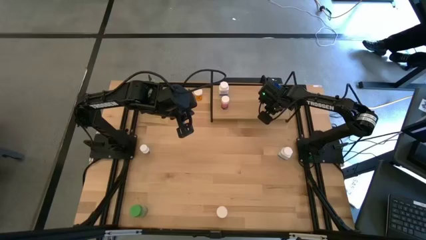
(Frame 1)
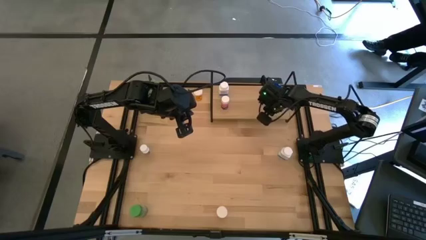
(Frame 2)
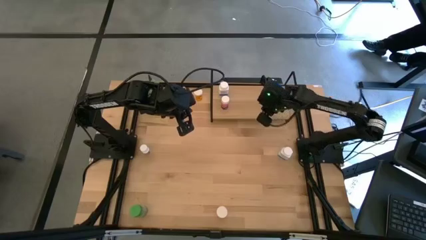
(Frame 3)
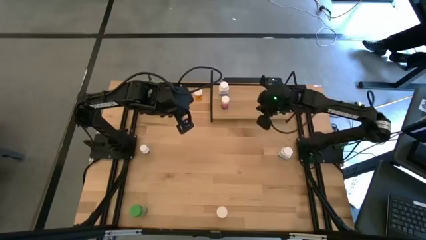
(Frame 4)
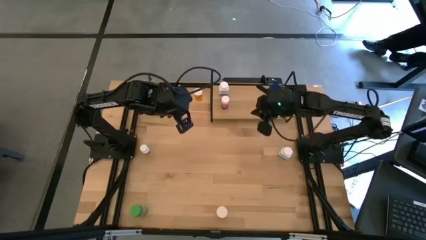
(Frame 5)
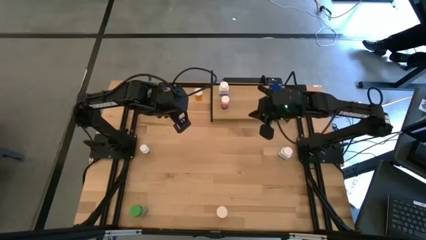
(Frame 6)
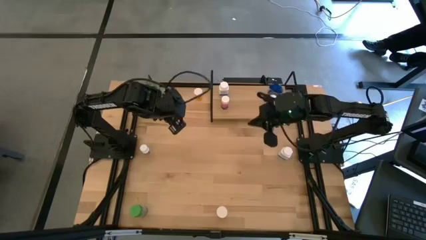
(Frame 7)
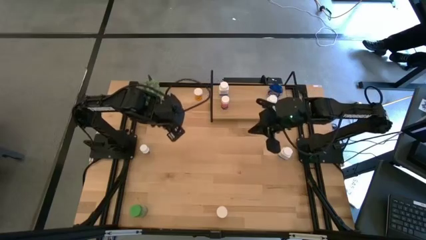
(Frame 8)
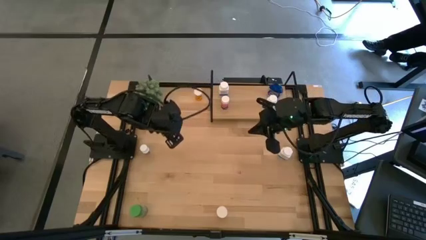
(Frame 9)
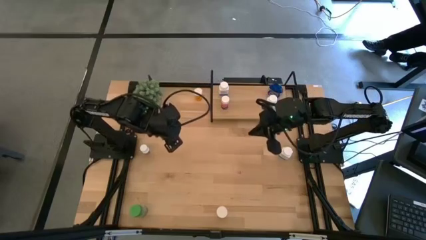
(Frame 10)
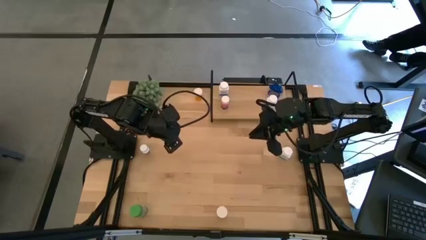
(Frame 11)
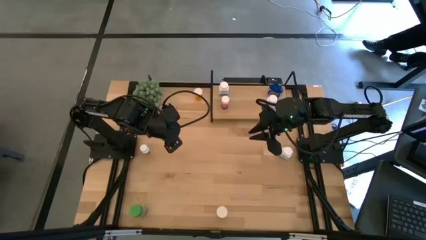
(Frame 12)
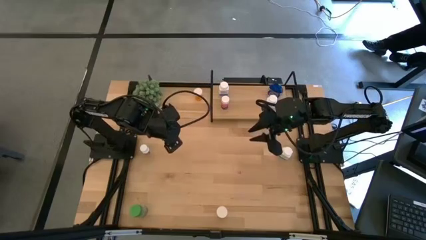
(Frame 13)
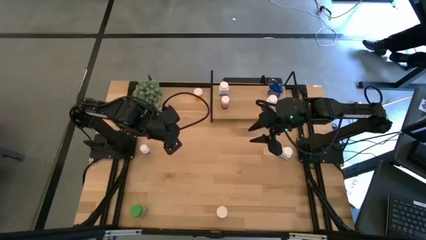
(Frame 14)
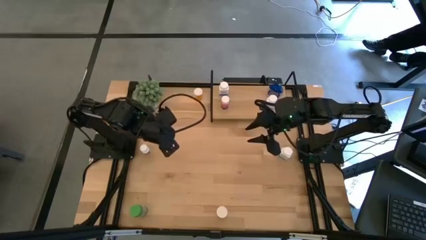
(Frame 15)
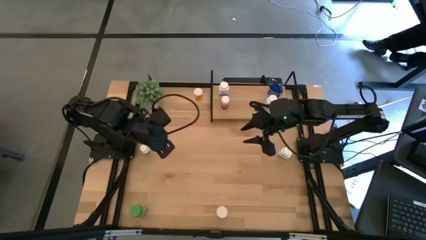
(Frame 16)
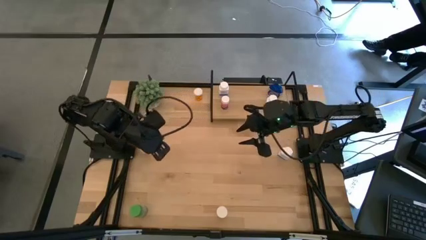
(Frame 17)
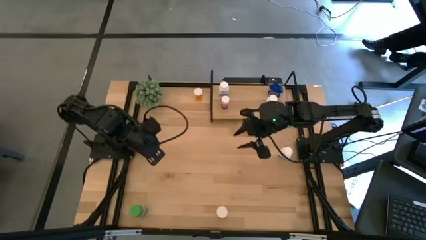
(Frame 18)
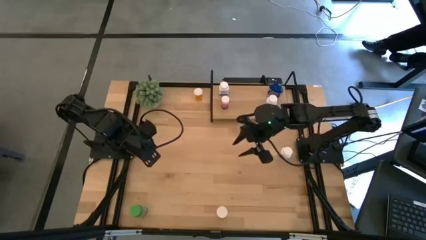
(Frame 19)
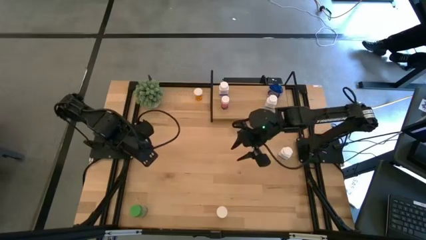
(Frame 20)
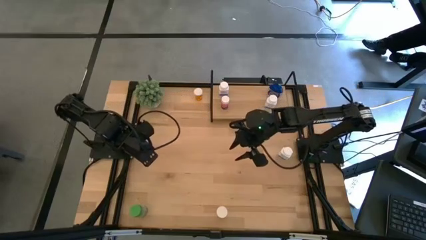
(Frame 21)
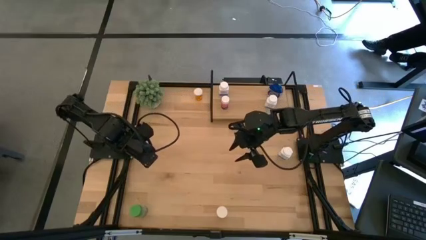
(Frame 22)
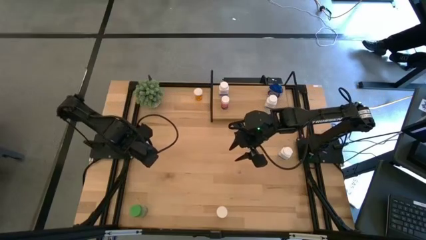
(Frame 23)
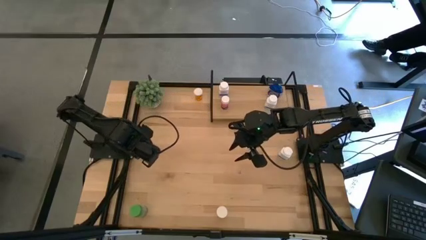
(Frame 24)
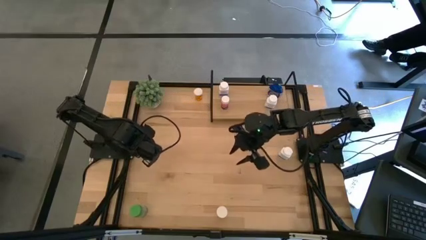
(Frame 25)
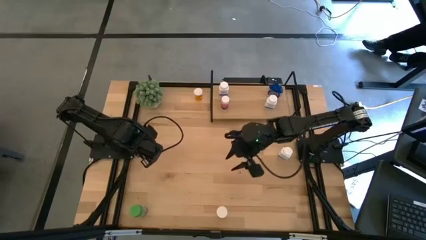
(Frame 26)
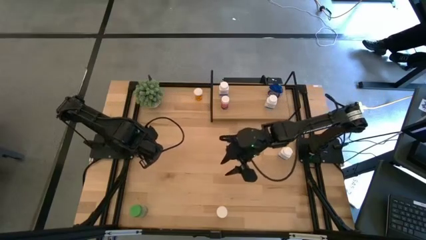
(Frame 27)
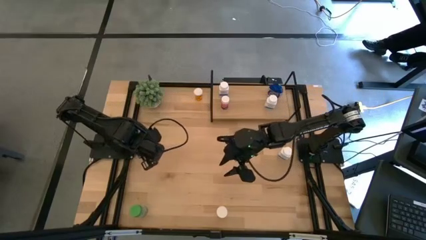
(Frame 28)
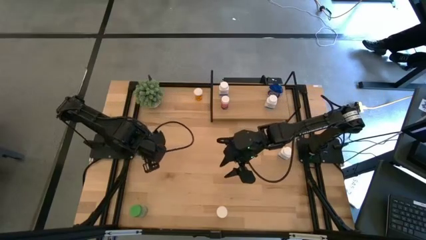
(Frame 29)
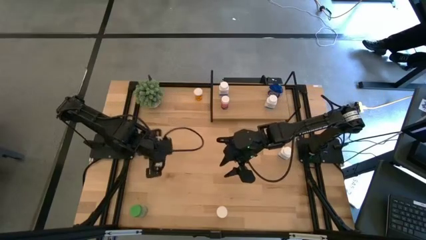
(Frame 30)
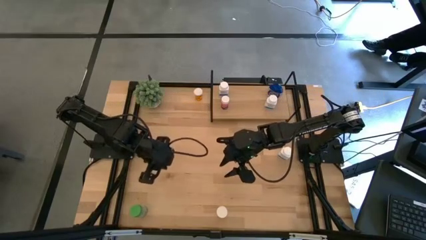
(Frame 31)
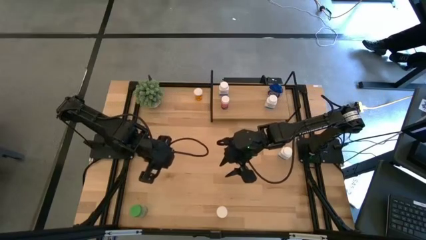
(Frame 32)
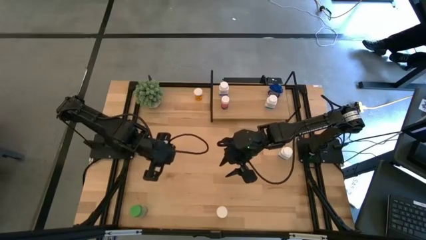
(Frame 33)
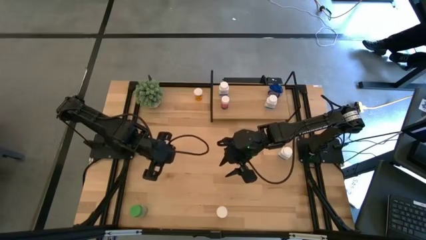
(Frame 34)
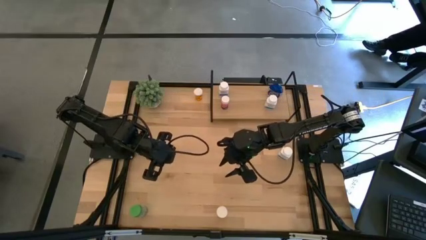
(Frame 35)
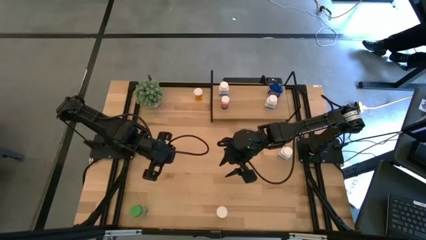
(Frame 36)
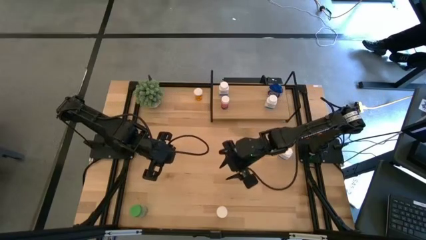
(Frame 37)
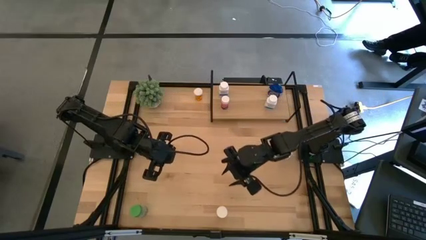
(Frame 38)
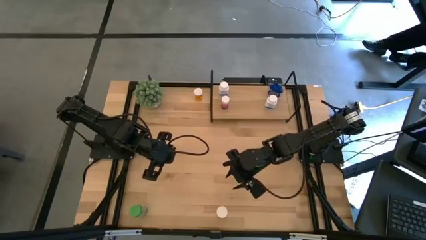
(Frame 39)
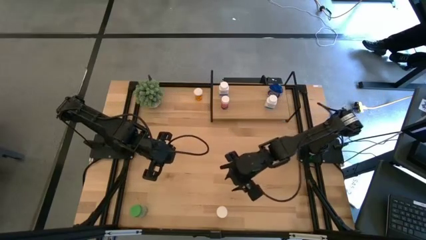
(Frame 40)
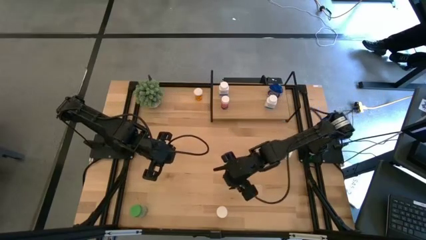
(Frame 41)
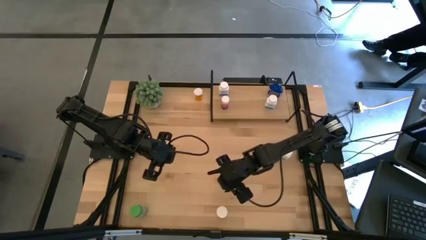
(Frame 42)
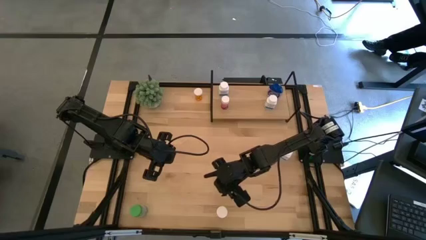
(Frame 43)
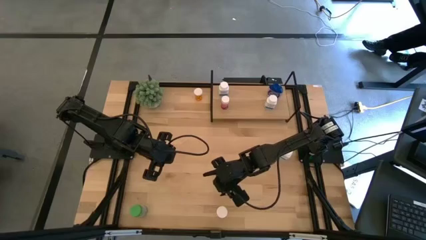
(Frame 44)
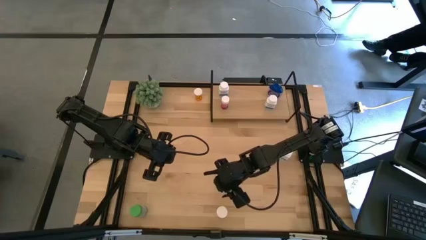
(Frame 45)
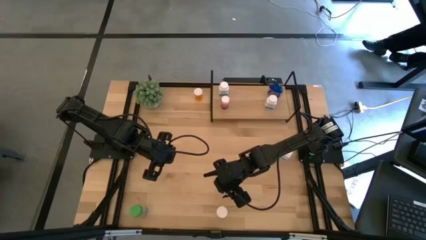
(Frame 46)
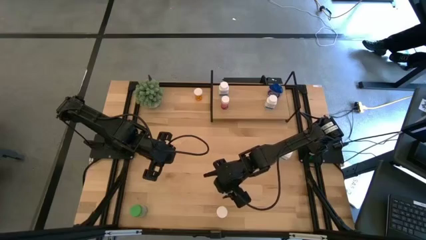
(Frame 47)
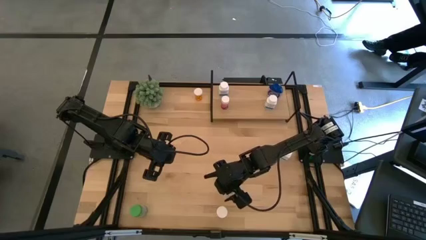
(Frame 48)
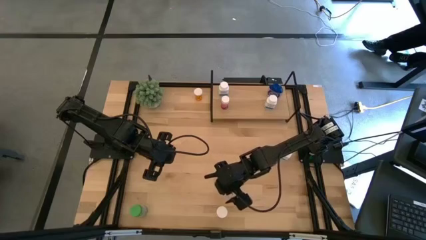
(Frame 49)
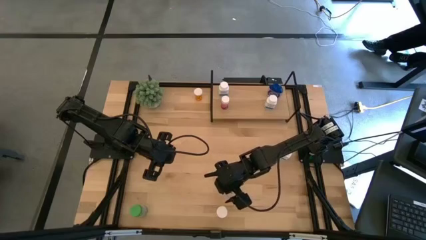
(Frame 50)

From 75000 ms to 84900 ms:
Task: Pick and place medicine bottles onto shelf by color
Put the orange medicine bottle on the shelf

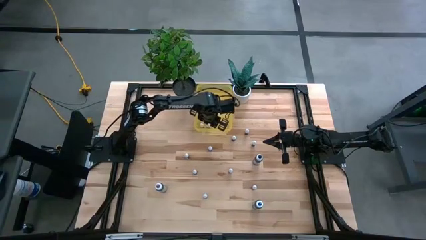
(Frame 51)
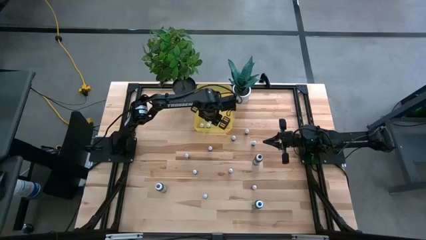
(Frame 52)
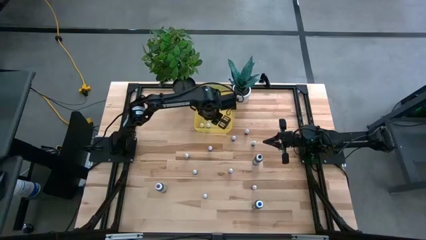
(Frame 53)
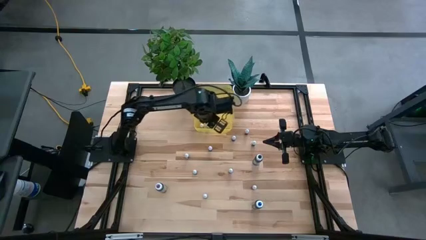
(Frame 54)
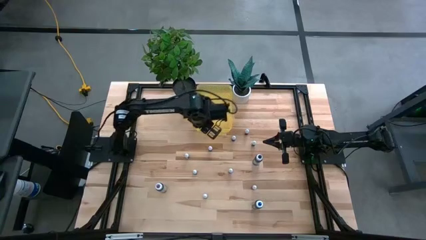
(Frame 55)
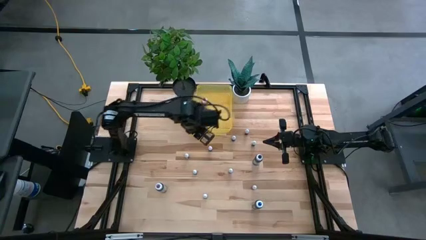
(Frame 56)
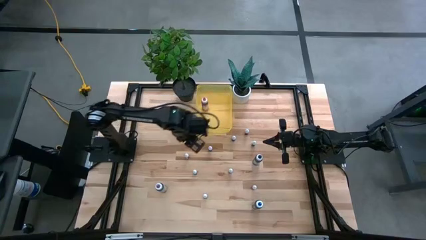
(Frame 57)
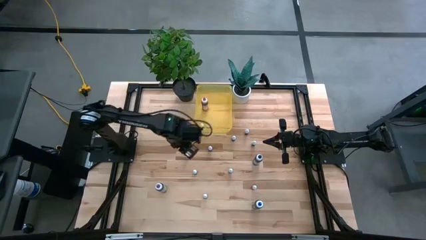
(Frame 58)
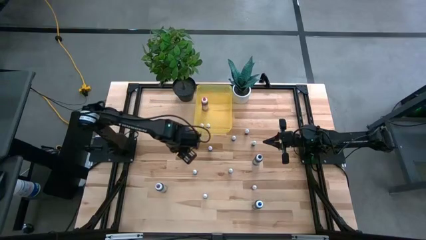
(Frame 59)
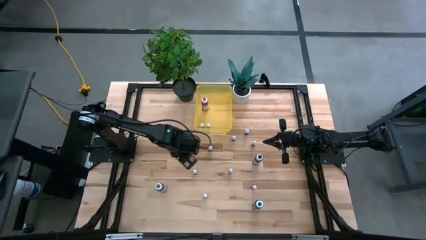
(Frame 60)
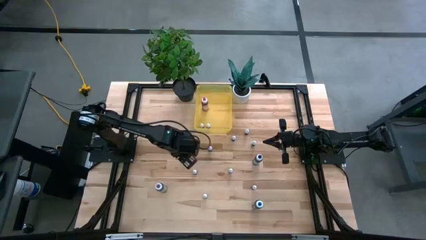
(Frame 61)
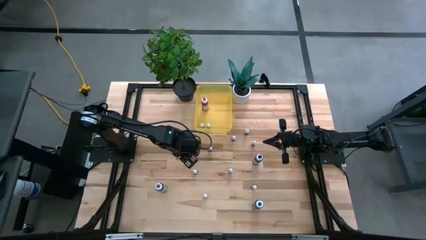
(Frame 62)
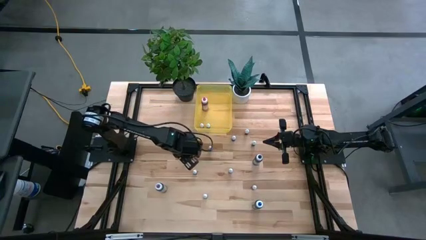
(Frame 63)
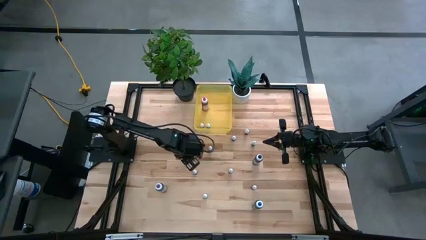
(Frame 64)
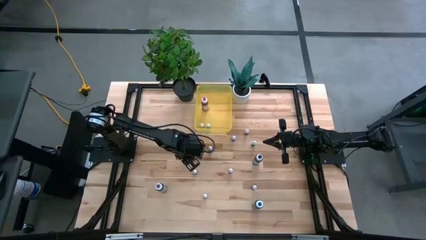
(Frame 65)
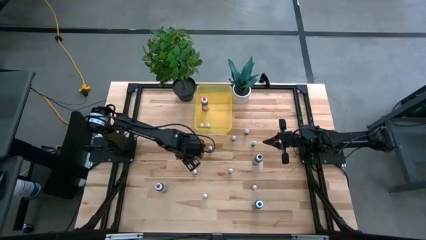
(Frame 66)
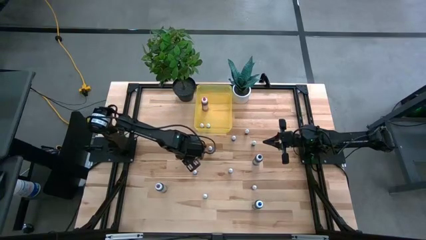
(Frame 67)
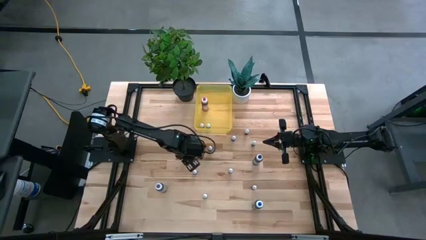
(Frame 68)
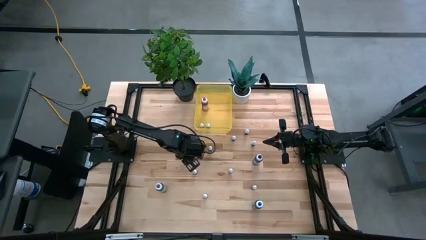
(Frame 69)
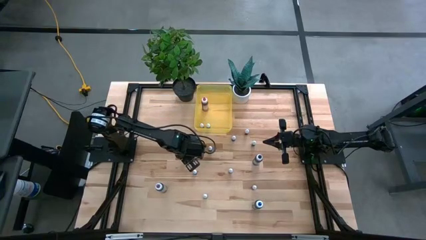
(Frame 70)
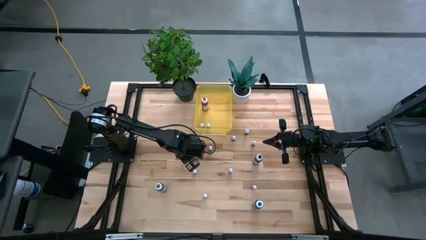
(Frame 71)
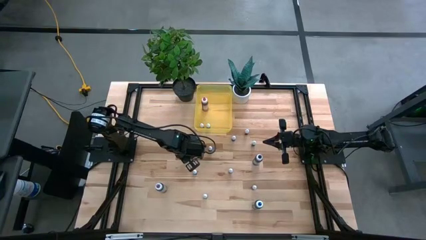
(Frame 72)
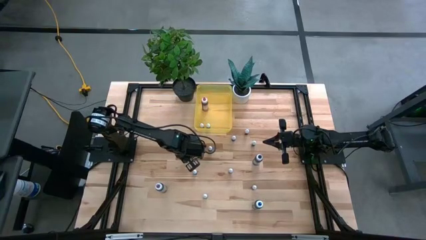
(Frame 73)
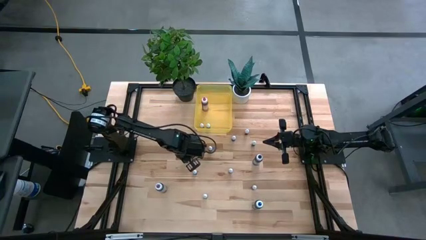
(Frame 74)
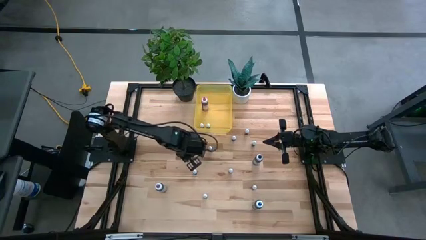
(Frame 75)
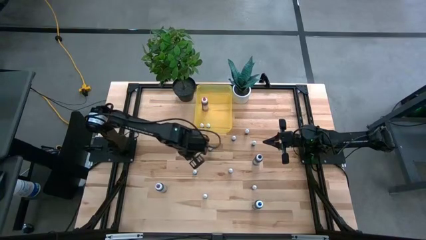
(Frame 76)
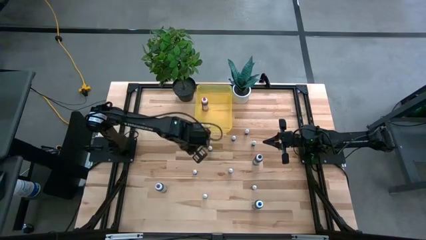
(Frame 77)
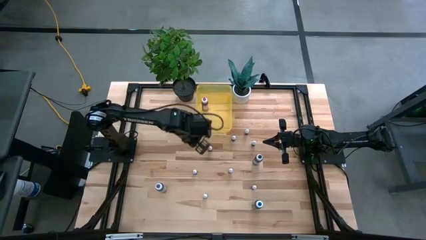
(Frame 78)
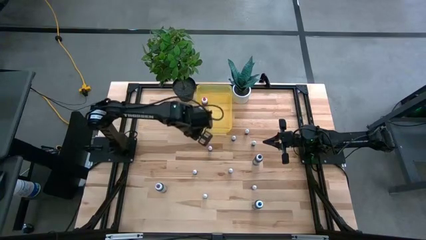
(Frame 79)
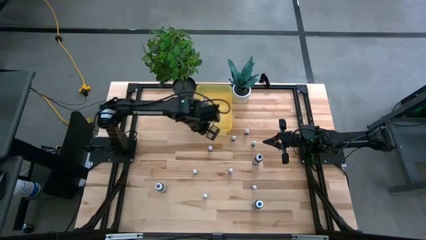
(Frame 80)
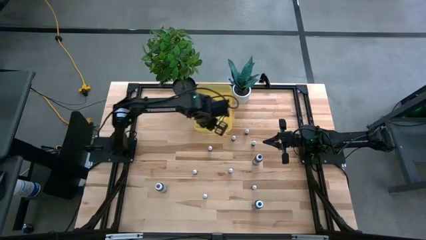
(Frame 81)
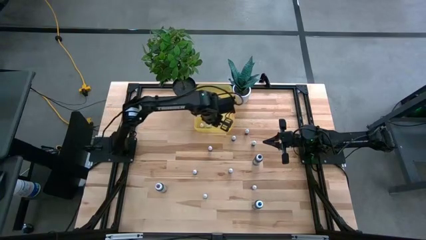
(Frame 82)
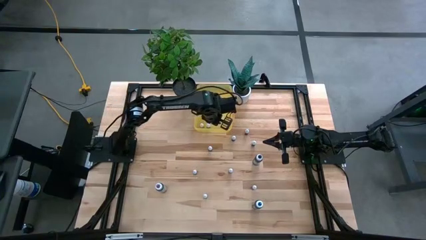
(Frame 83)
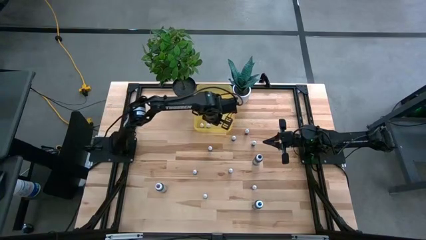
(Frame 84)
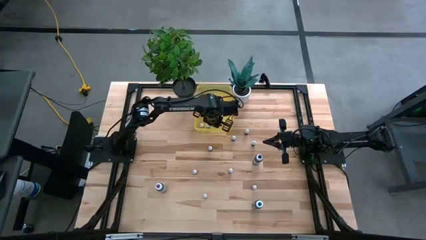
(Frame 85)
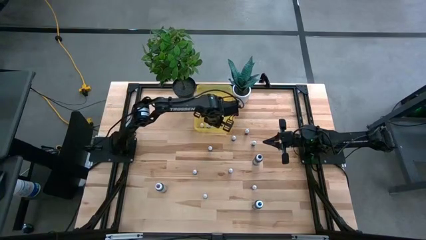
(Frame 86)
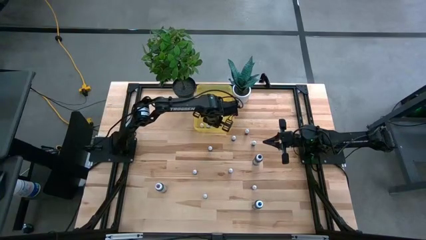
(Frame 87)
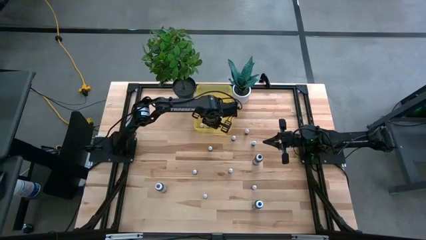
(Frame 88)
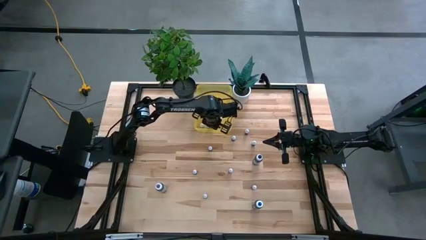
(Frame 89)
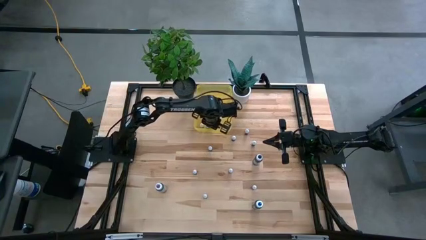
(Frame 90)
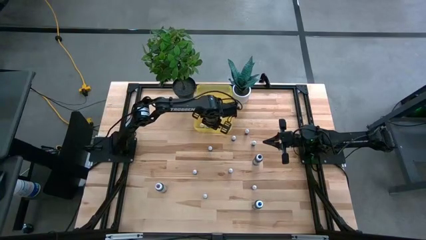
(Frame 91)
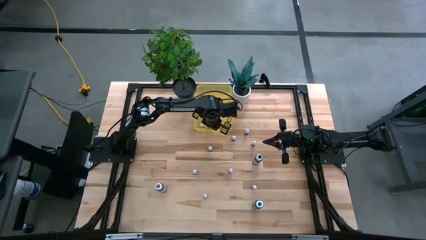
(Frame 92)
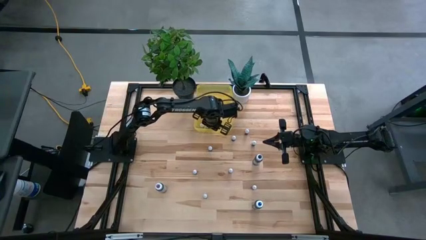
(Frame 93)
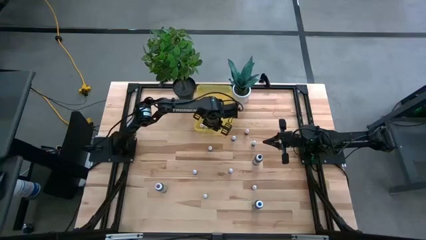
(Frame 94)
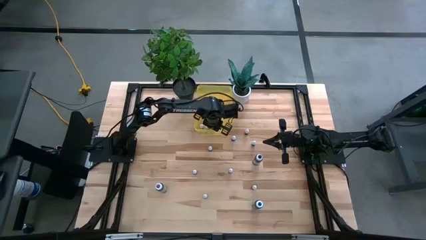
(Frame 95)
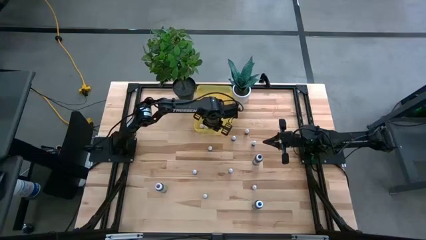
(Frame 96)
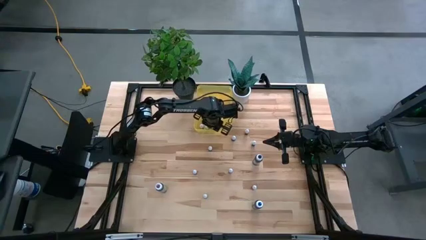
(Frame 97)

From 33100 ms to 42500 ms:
Task: Pick & Place food coloring
Put the small white food coloring bottle into the yellow bin
